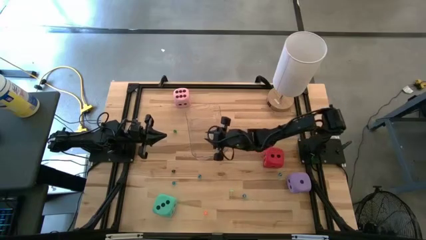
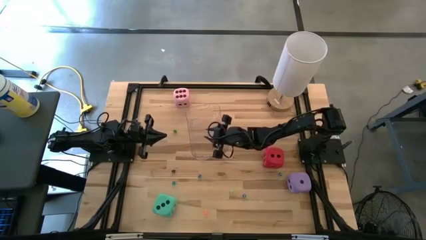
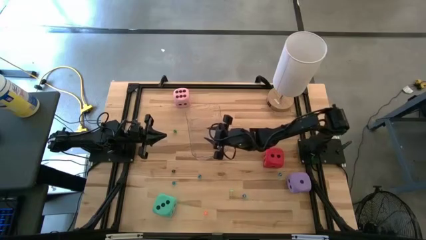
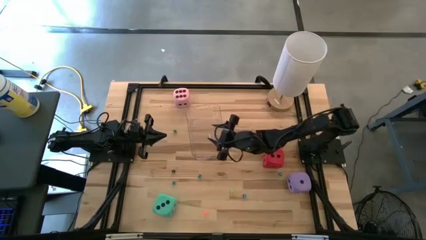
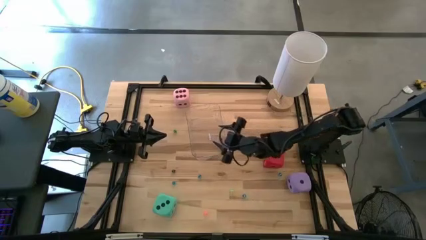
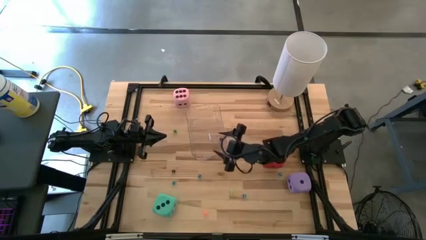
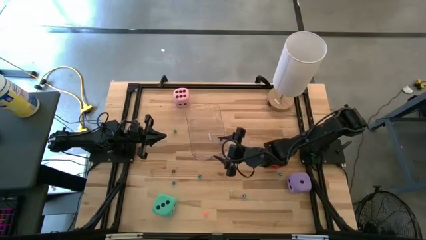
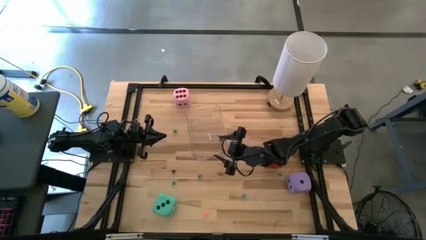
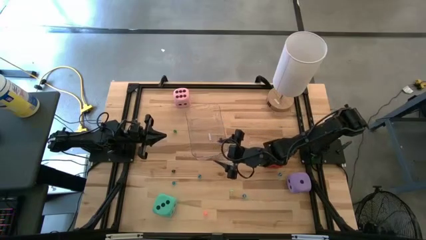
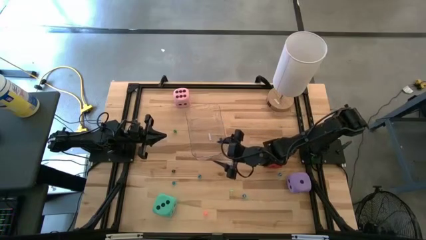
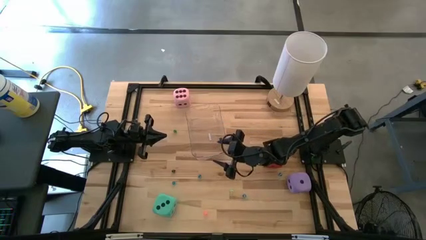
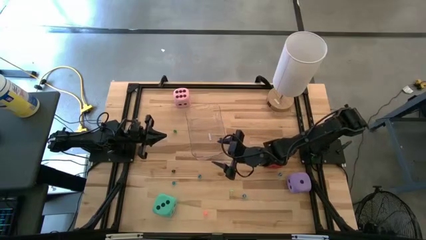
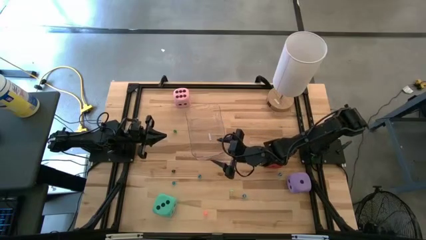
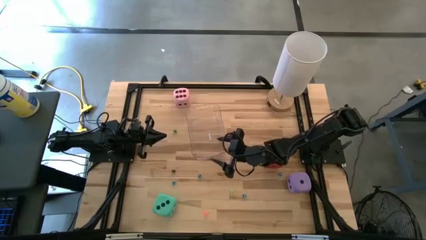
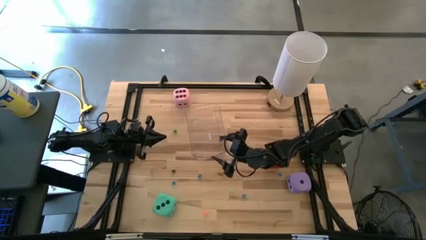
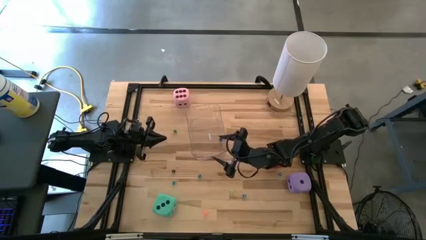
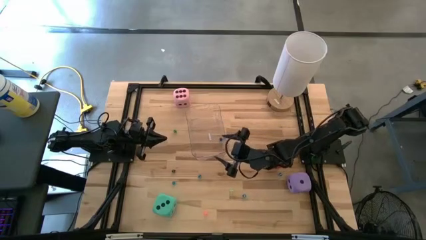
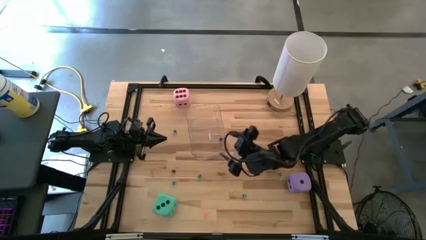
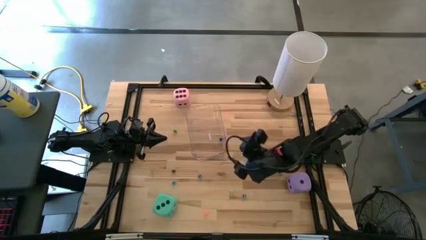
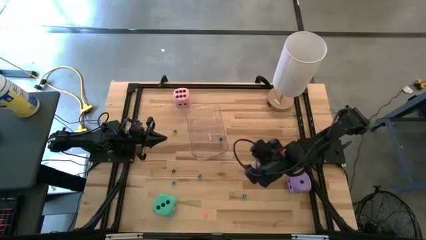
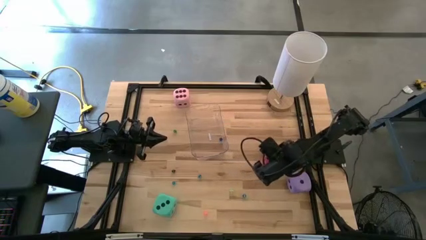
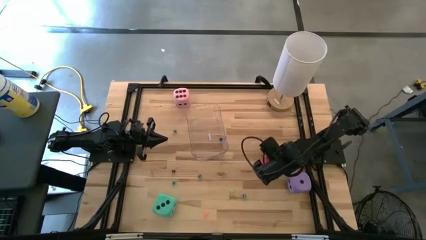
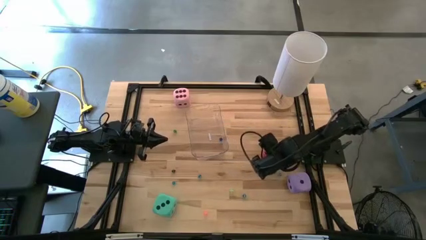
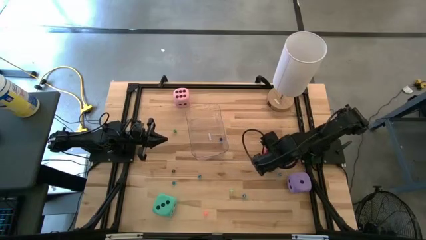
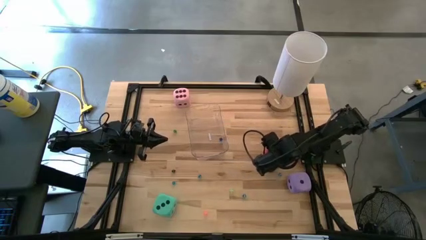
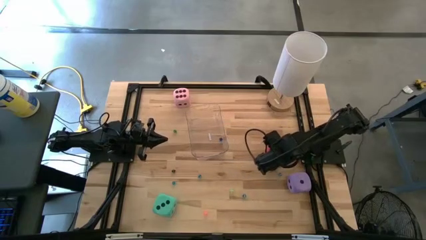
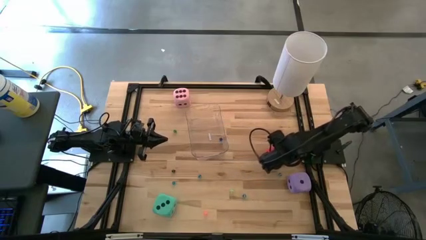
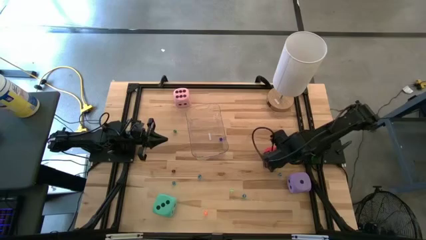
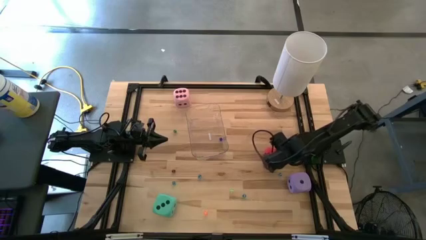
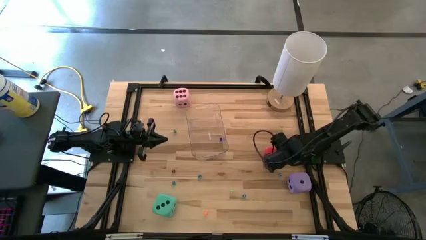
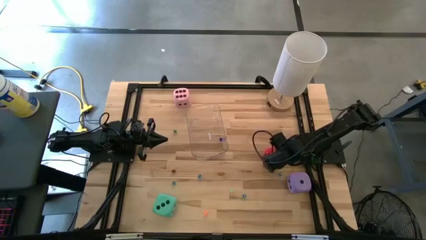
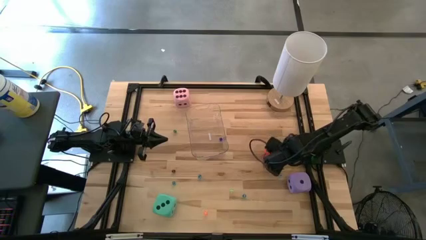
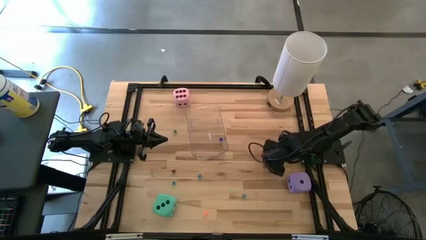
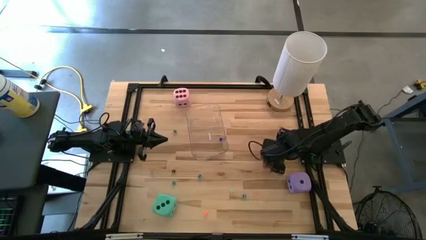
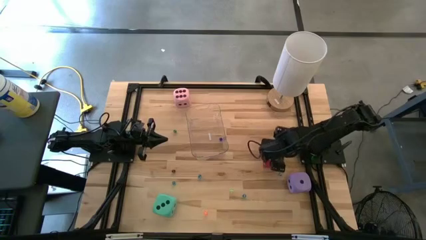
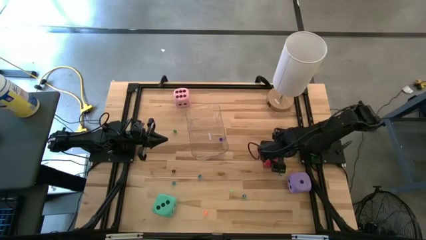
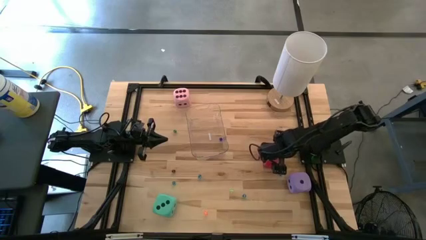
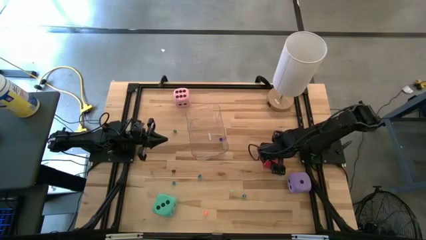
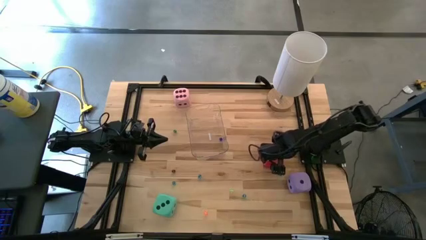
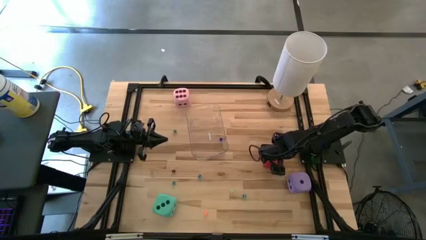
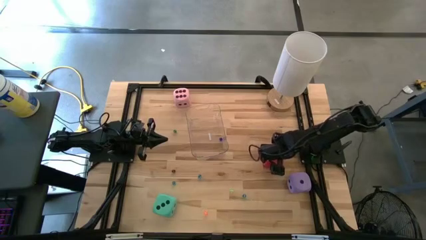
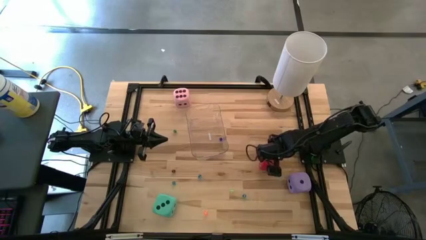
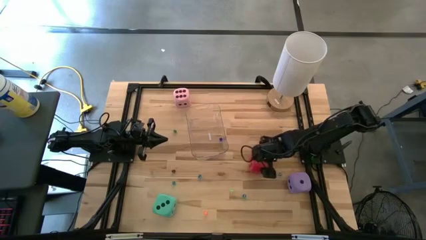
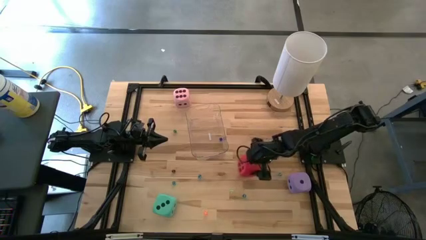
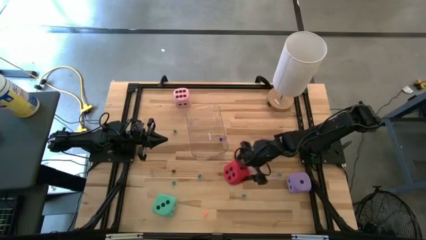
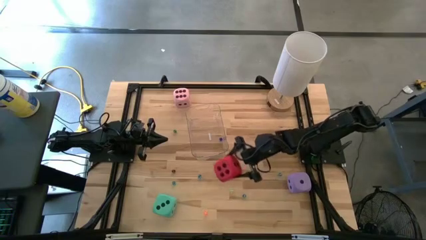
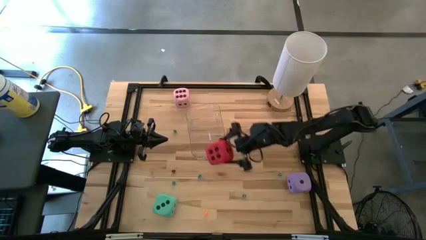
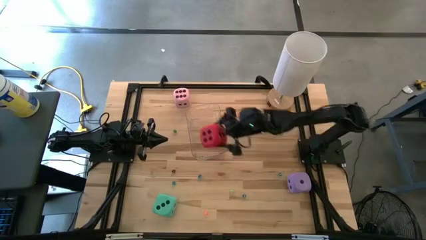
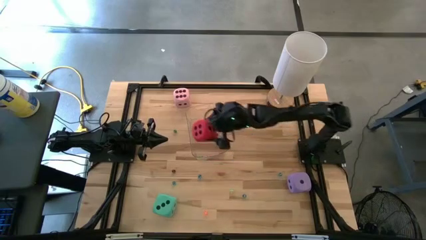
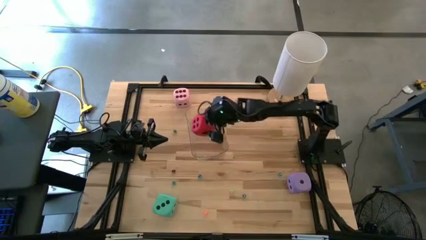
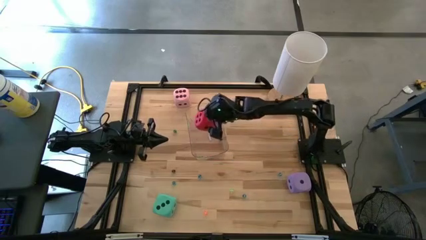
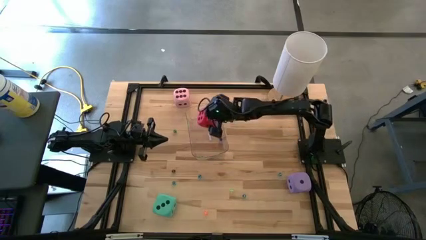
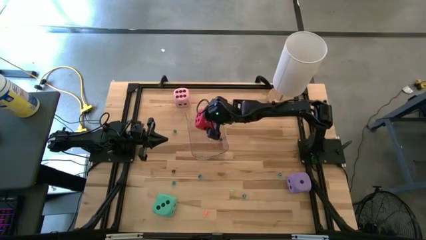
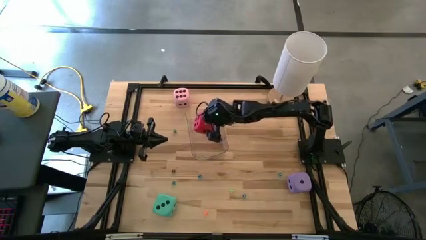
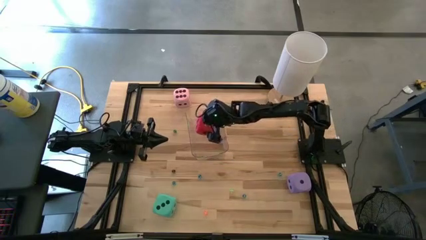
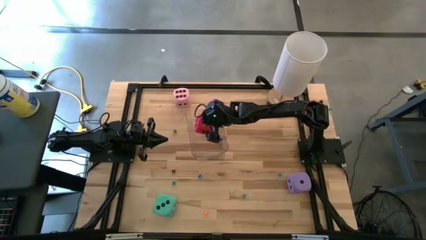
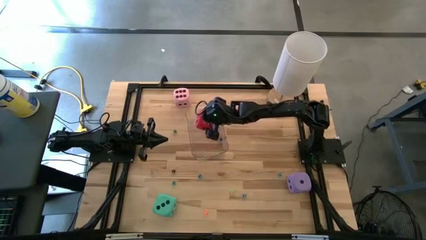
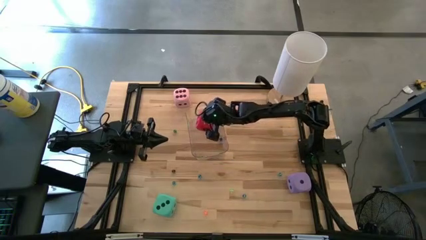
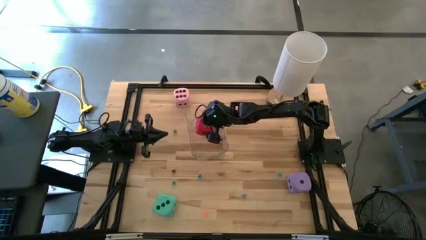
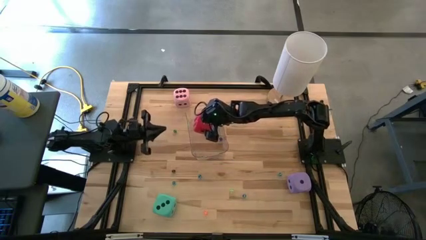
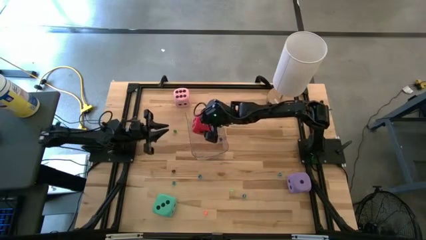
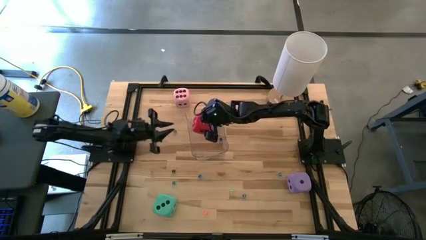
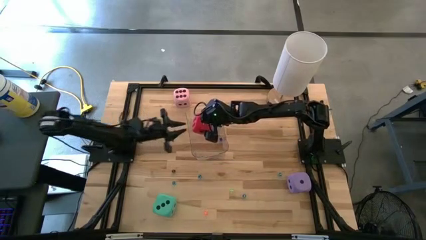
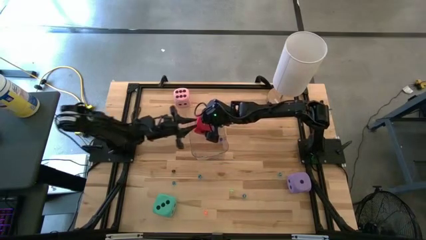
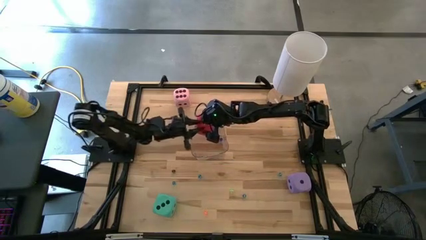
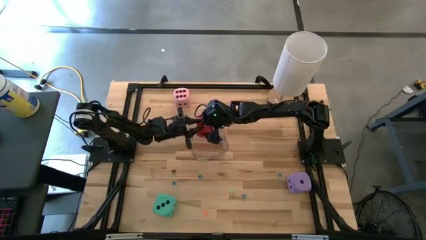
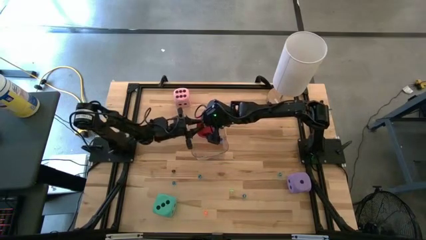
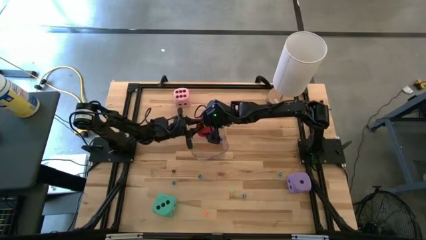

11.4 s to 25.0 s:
Task: Pick & Place Dice
Put the large red die into the transparent bin
